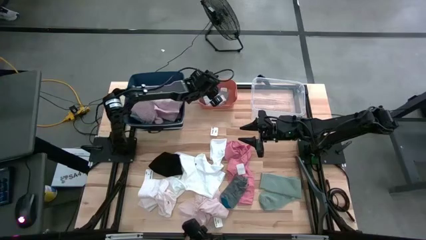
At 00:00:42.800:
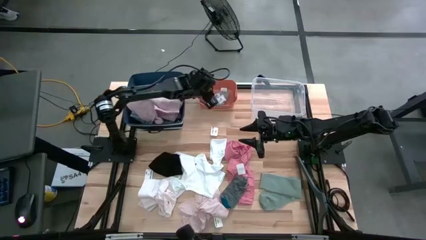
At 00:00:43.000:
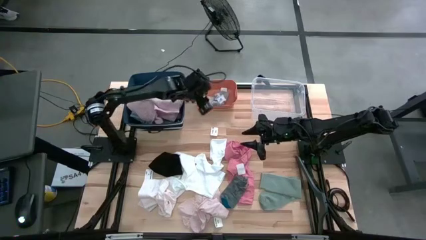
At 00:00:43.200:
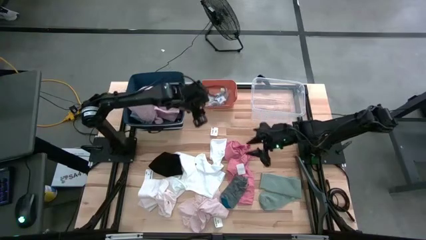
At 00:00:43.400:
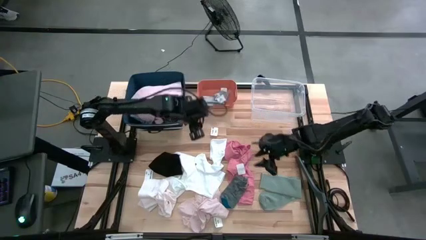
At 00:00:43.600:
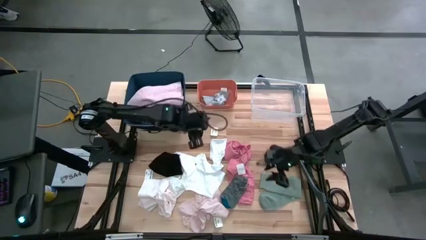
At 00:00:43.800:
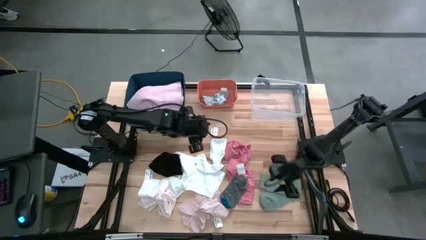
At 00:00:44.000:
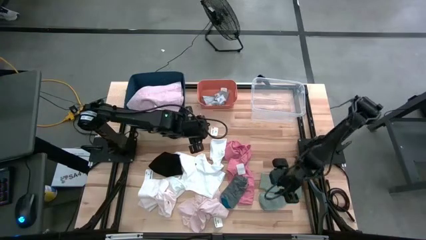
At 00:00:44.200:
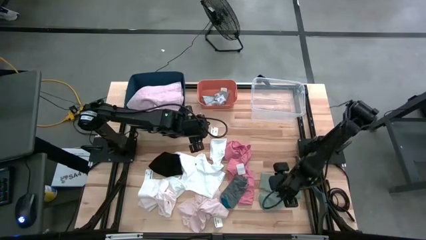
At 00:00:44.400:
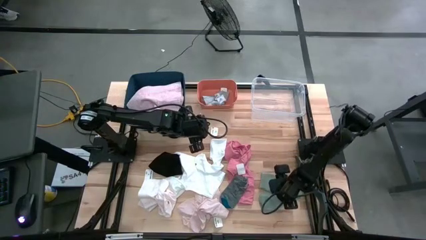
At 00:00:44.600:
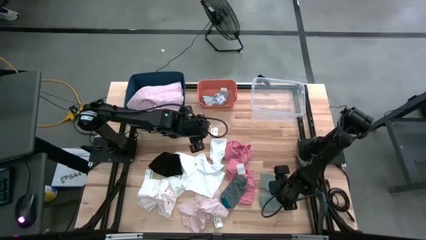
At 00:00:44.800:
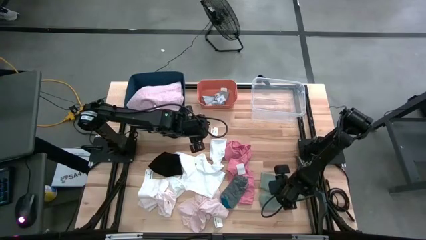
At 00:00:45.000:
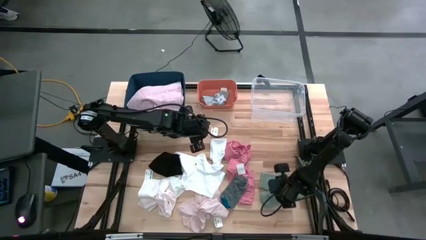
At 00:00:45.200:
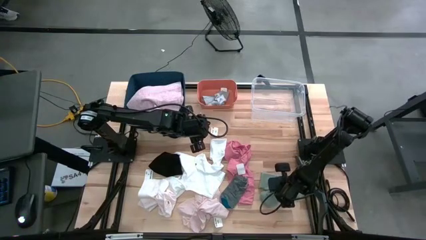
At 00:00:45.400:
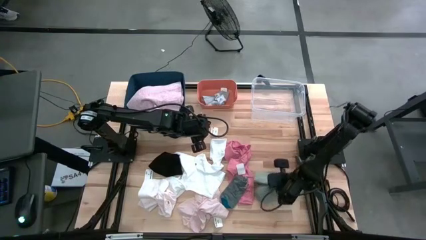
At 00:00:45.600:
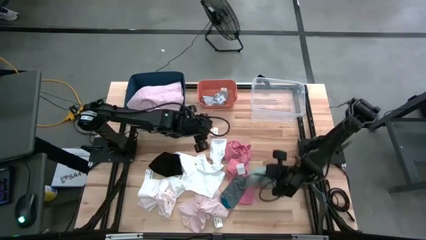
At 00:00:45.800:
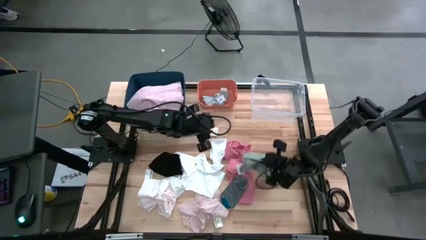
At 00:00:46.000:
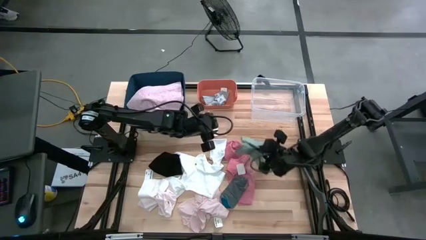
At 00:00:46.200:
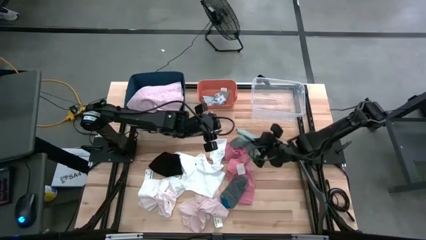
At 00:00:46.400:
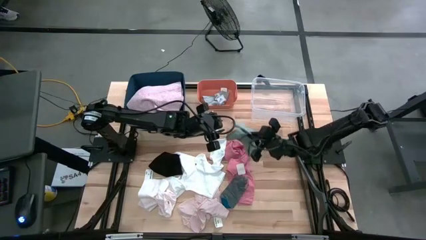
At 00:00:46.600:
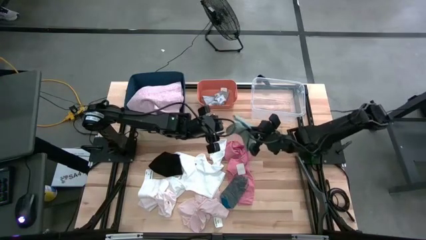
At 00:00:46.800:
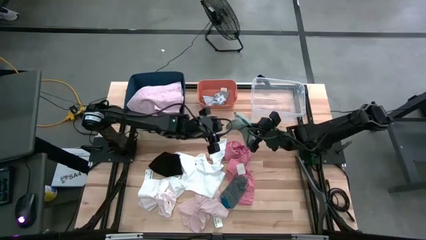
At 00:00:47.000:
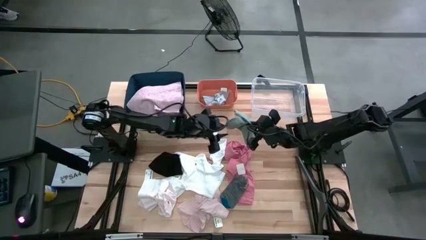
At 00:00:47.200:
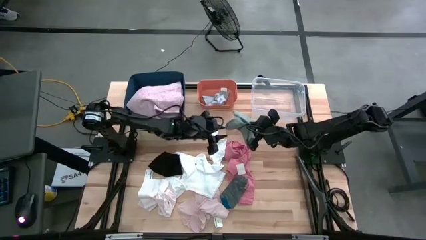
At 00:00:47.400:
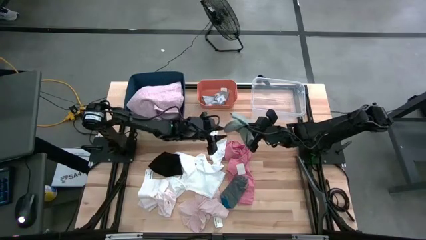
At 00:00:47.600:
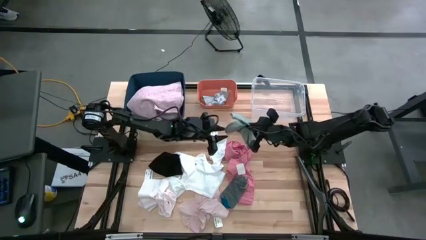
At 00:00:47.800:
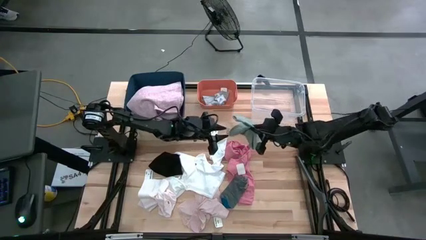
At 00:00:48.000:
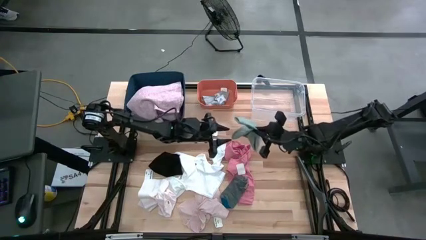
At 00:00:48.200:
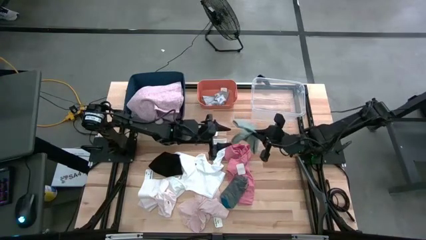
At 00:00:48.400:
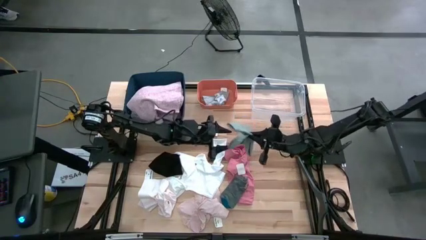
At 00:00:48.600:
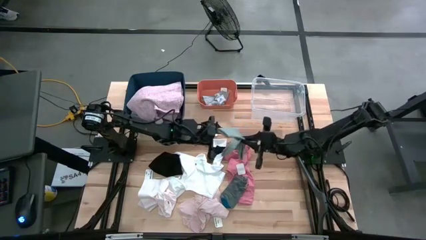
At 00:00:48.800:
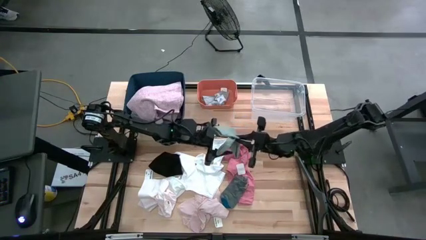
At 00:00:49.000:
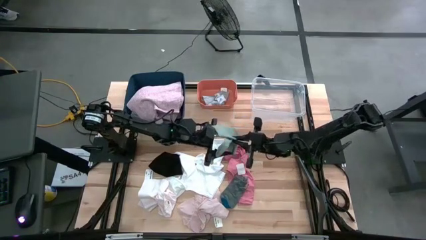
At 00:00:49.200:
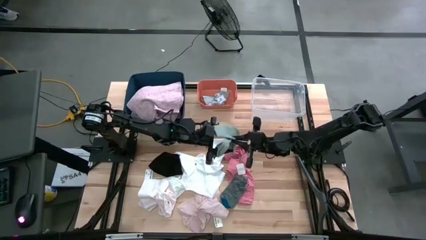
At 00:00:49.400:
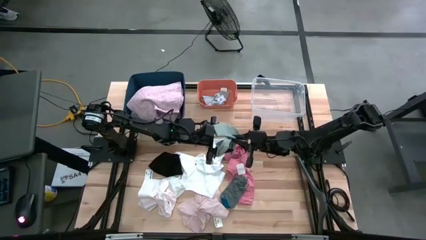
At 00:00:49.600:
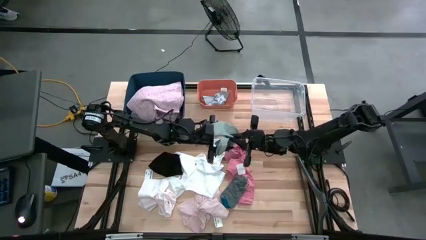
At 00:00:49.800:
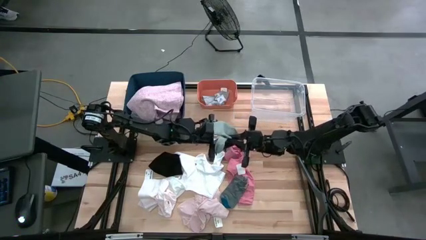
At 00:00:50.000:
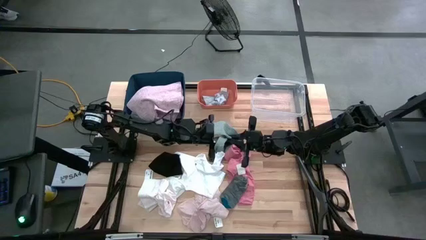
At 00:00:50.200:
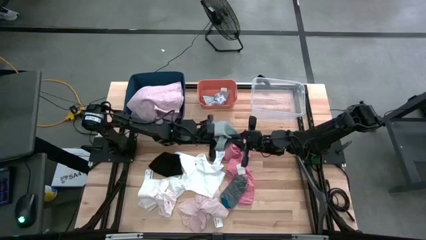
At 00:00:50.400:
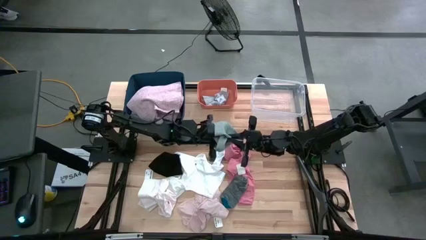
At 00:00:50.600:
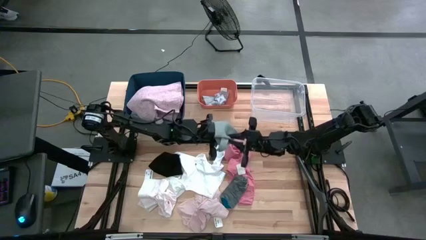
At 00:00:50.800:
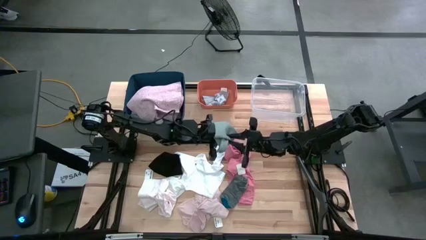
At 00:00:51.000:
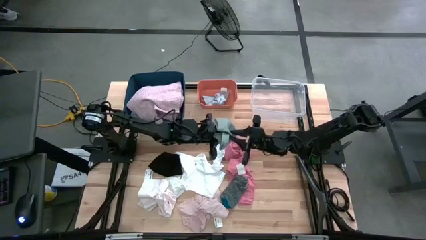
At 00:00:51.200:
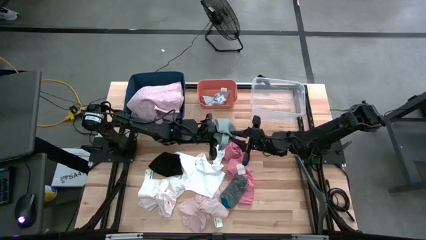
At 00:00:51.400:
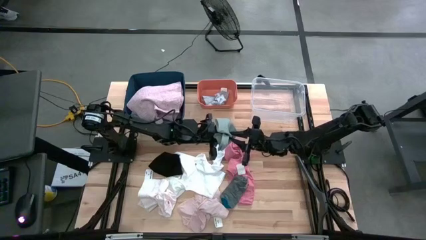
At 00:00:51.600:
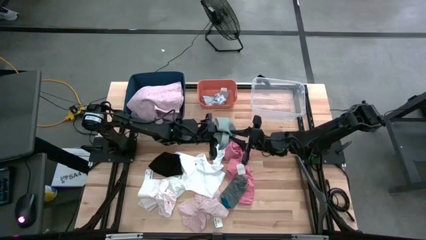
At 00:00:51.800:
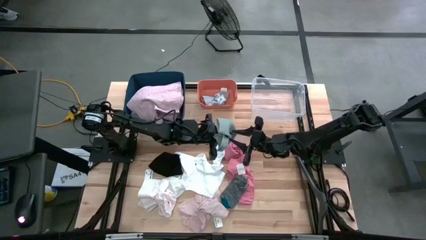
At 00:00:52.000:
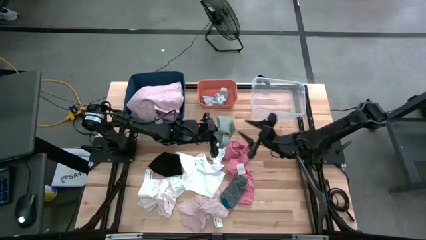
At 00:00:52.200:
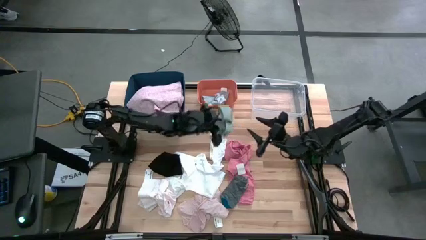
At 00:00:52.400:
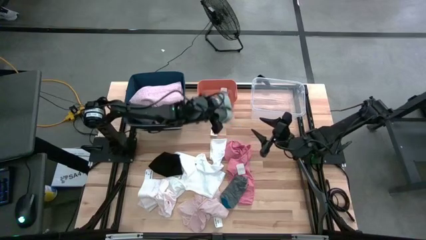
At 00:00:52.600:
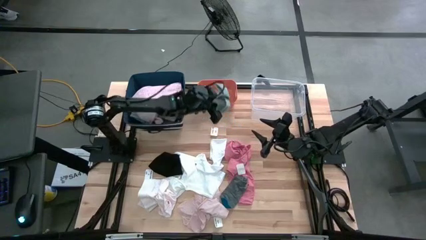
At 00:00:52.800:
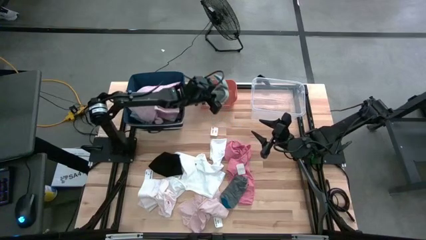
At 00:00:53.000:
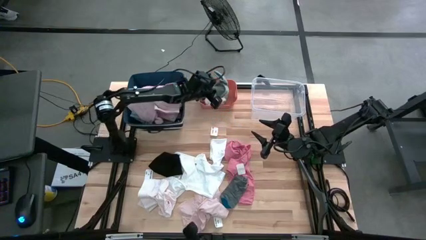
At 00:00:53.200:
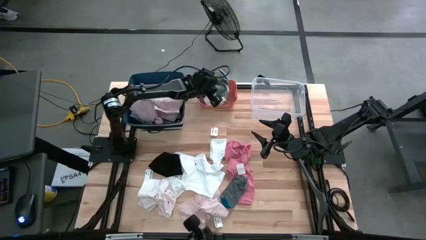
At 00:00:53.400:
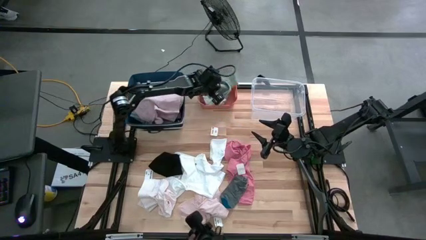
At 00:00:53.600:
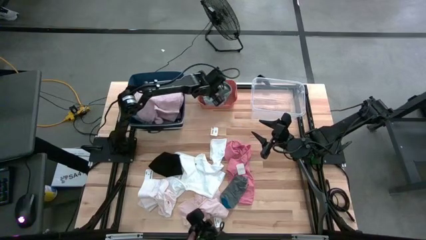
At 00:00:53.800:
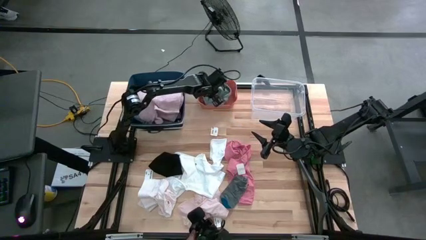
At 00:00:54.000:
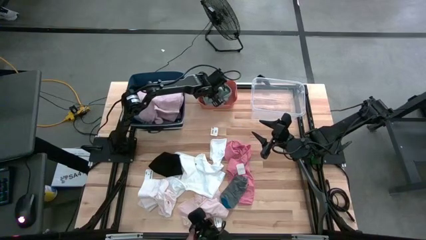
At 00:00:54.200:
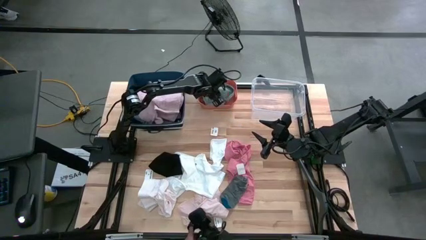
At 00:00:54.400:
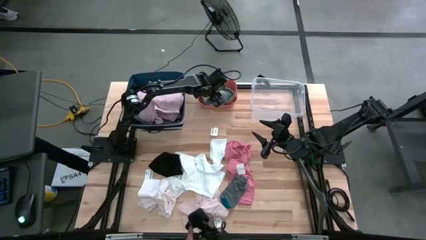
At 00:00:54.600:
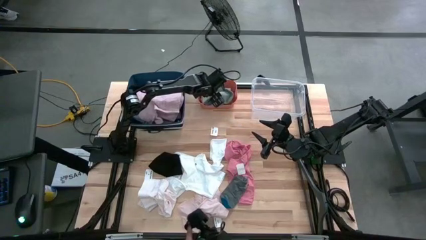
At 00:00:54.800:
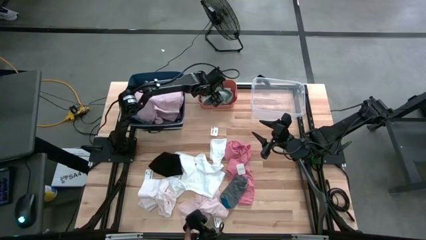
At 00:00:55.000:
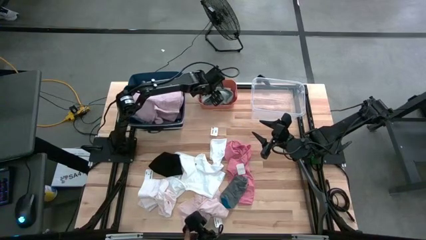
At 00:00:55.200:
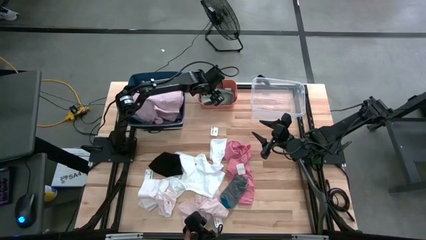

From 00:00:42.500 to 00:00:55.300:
Task: Pick & Place Cloths
Put the blue and green sock into the orange bin
